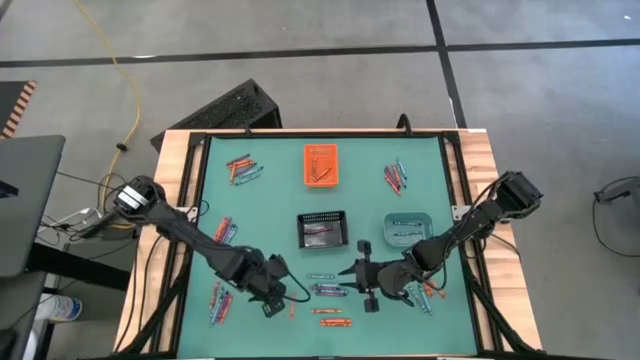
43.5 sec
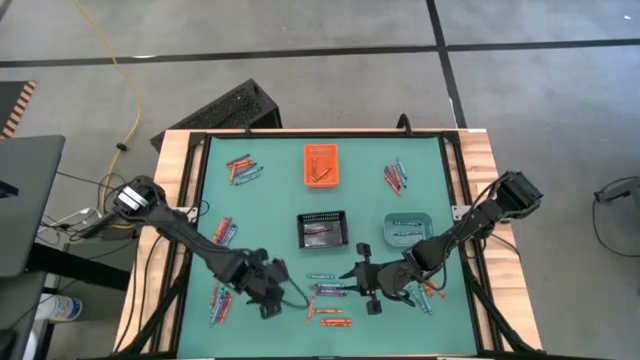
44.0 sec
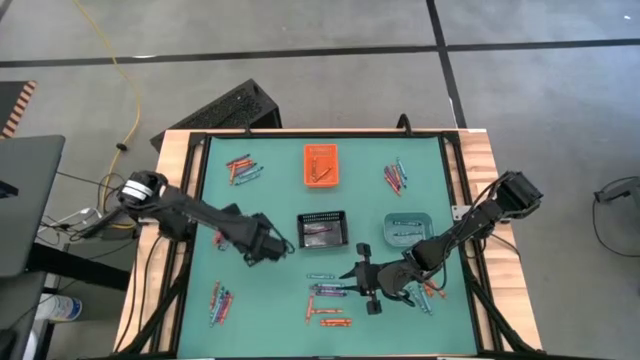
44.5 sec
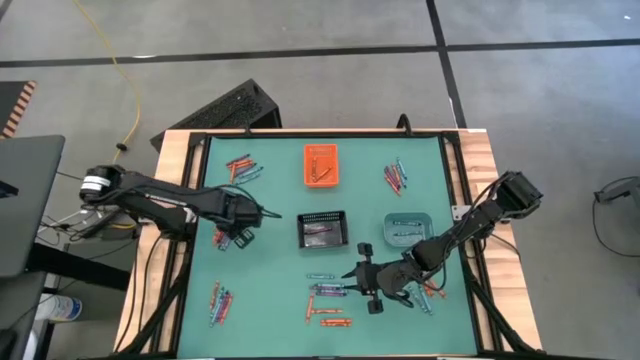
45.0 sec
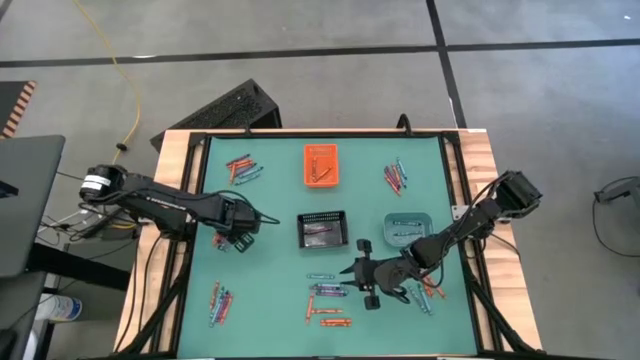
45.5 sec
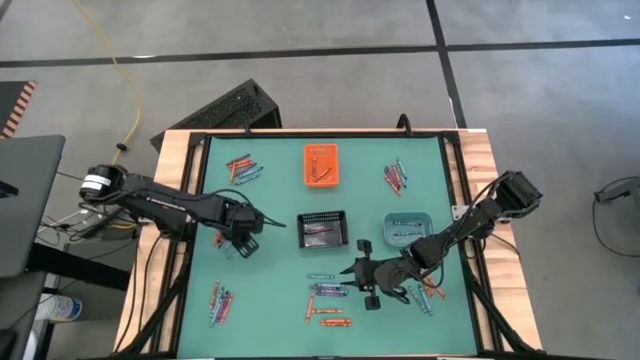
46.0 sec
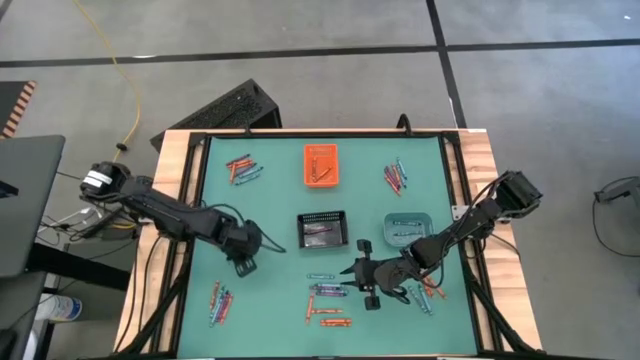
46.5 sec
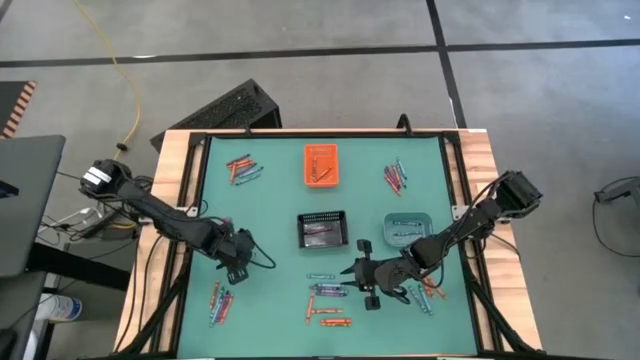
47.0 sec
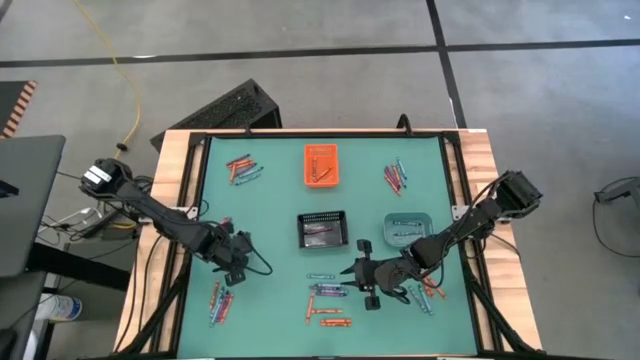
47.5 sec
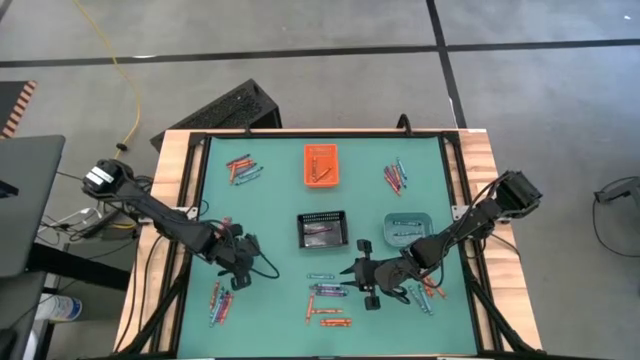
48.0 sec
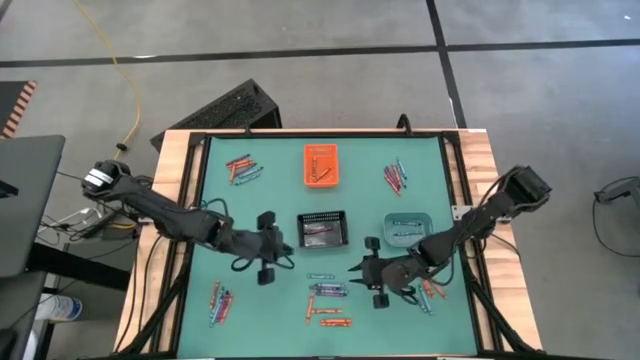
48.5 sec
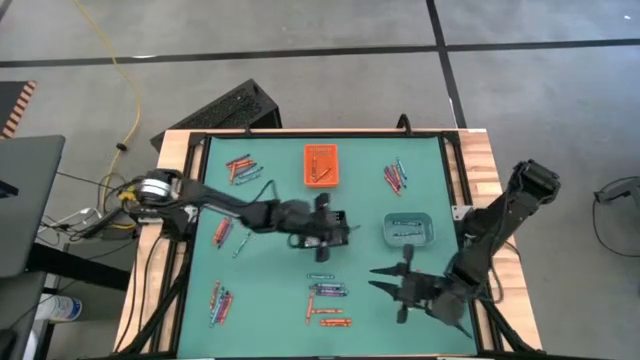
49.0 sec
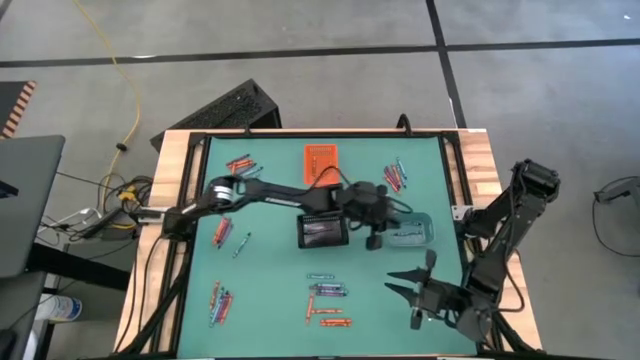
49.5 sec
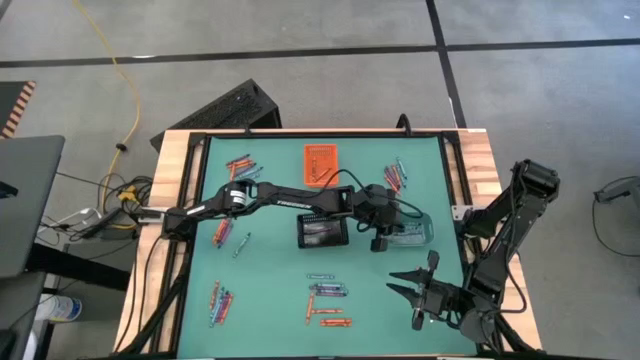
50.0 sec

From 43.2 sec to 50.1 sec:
Task: Sort crayons
Put the blue crayon into the green bin

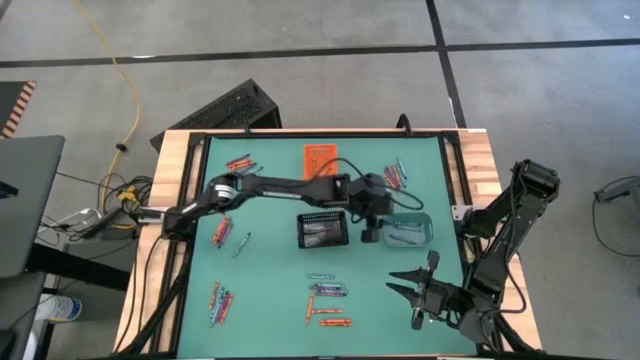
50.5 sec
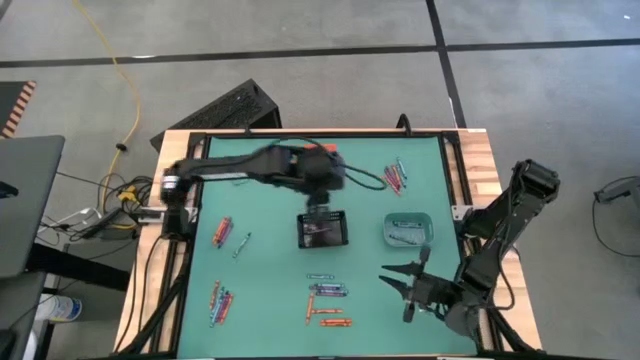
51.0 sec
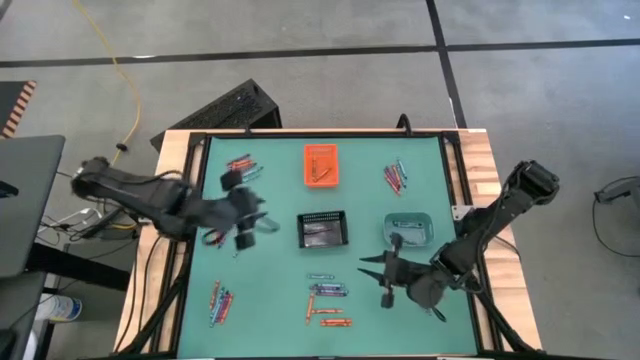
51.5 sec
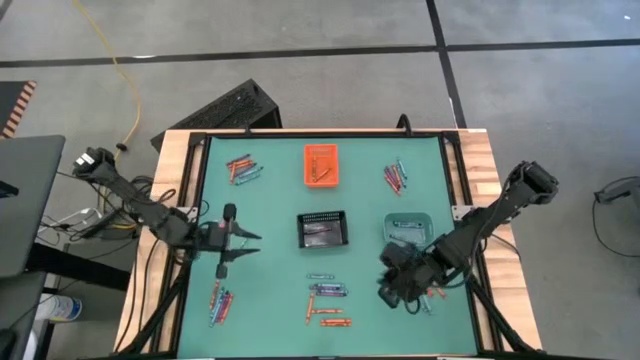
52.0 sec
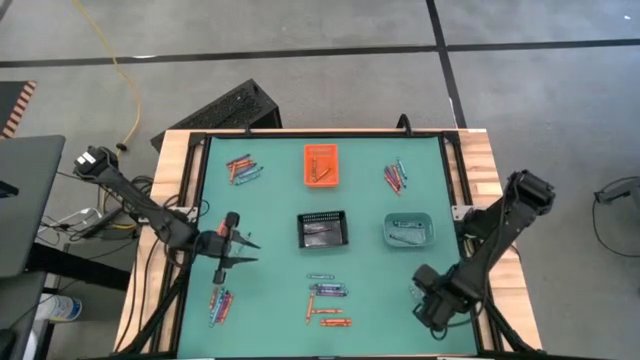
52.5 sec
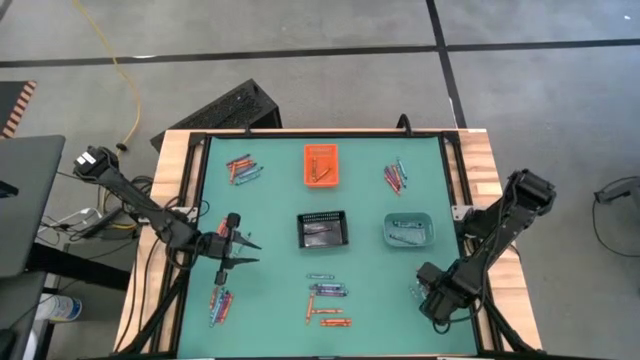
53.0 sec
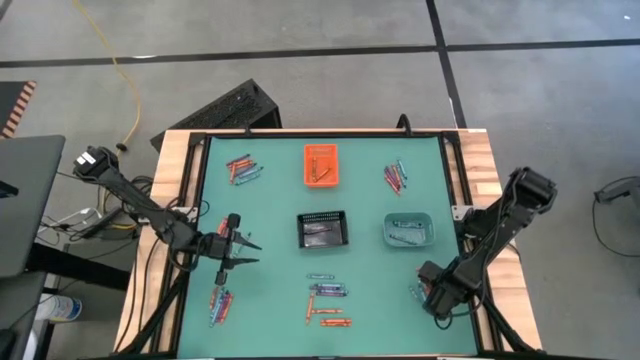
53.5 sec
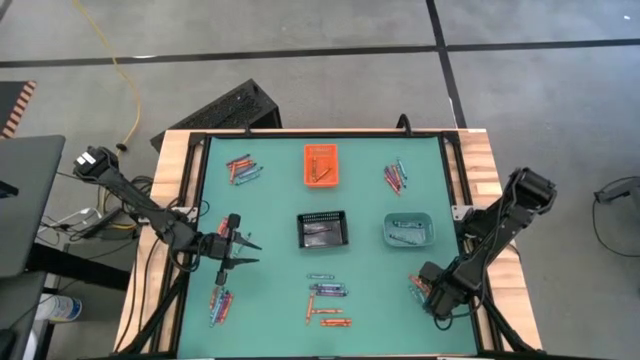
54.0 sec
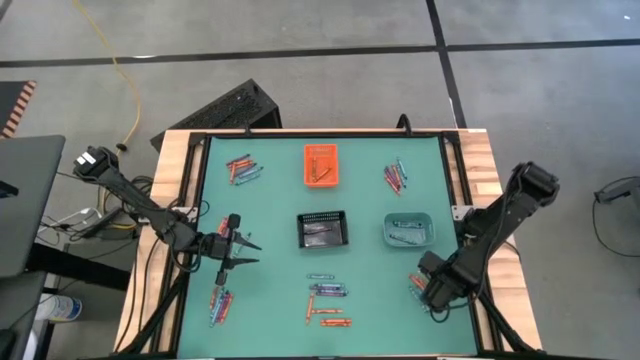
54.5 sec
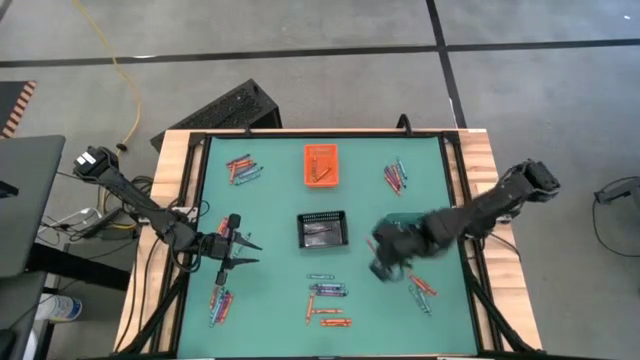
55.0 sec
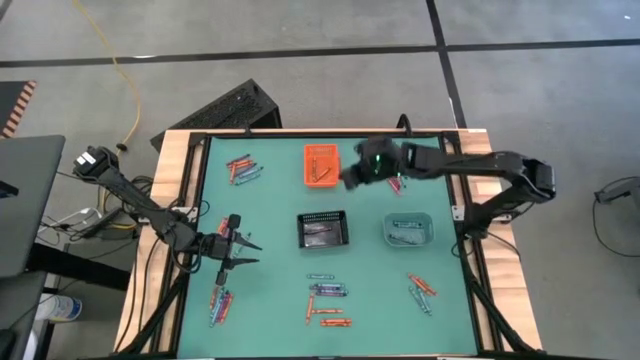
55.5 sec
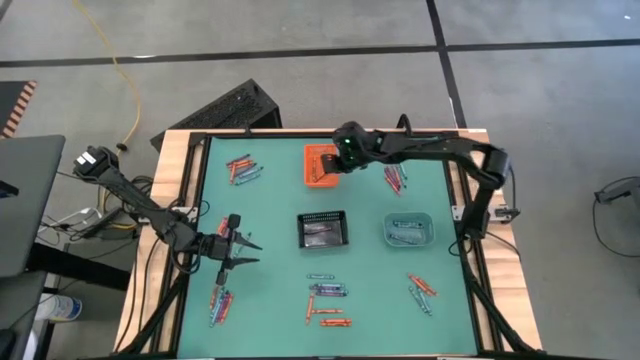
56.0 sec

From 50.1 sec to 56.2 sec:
Put the orange crayon into the orange bin

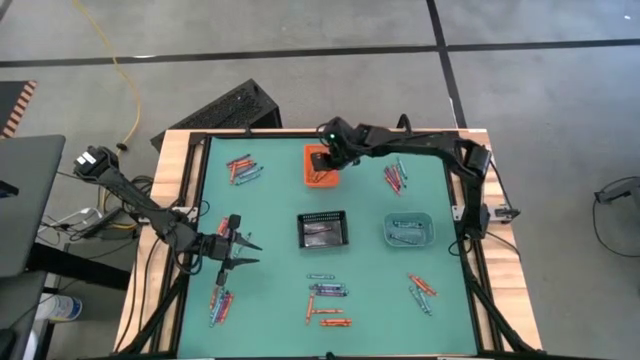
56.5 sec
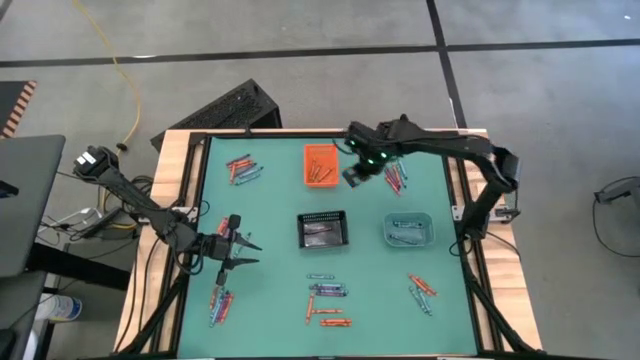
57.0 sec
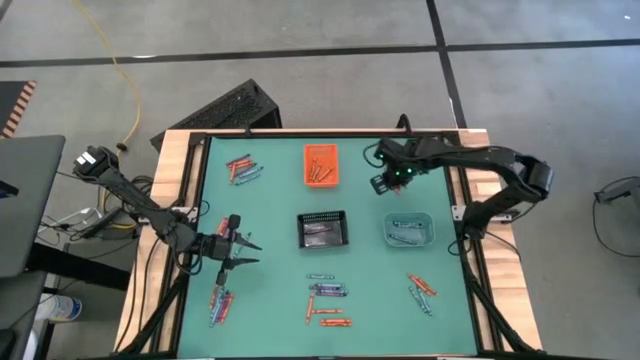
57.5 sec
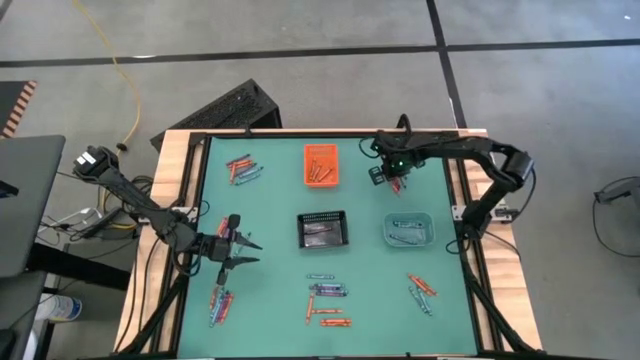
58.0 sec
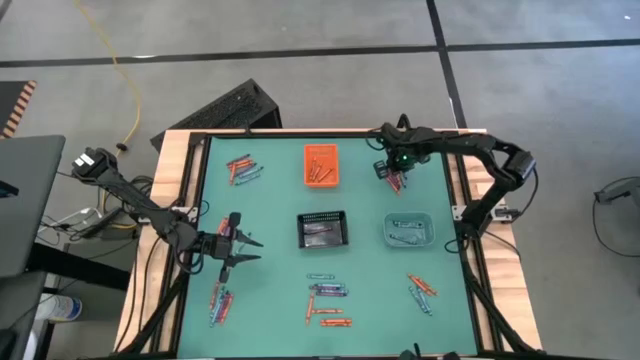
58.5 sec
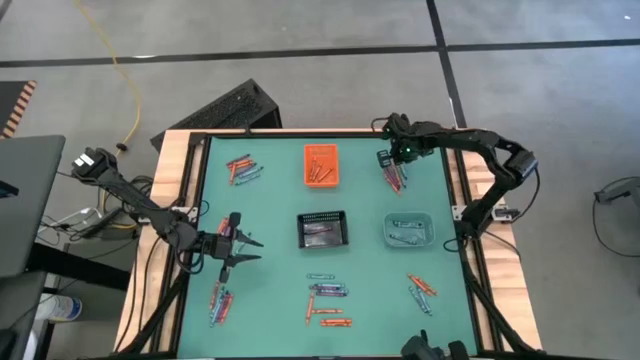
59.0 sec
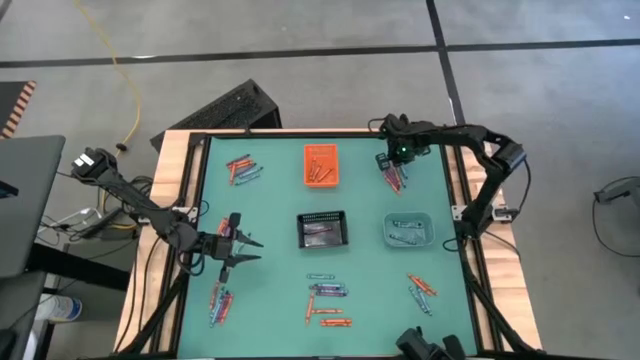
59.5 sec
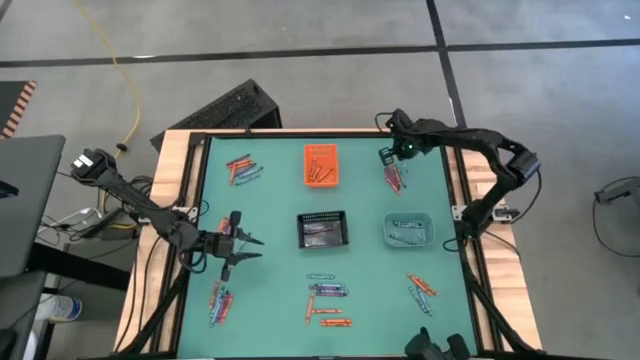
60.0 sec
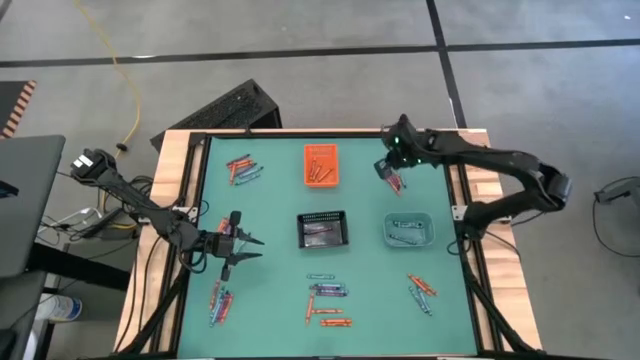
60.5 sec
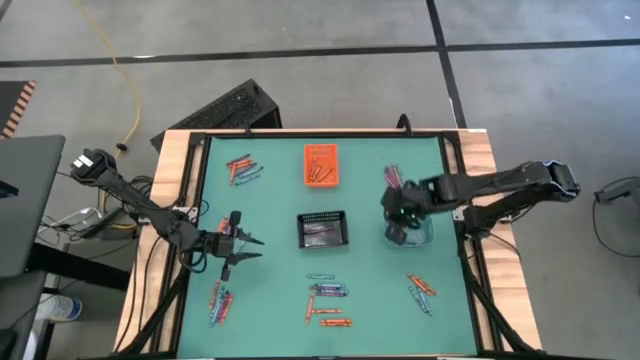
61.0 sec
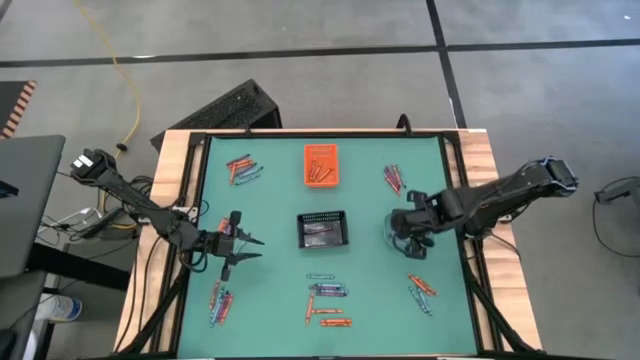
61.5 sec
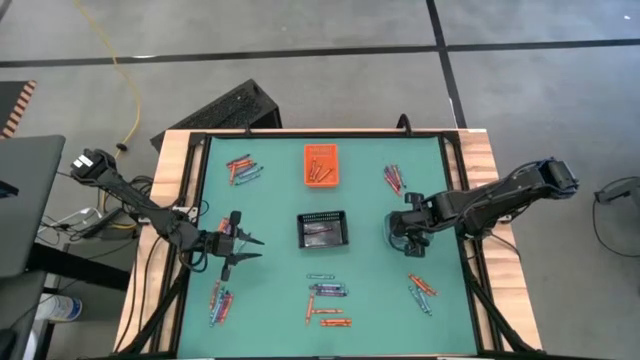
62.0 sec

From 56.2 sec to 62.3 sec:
Put the blue crayon into the green bin

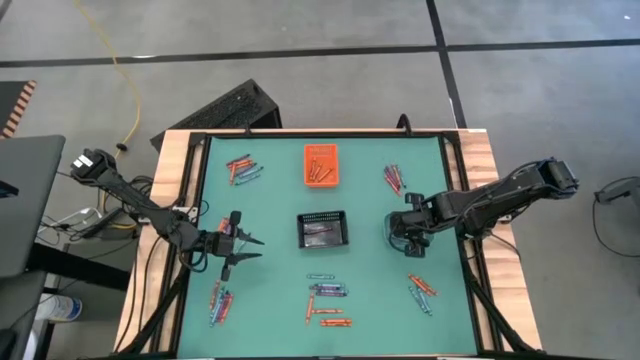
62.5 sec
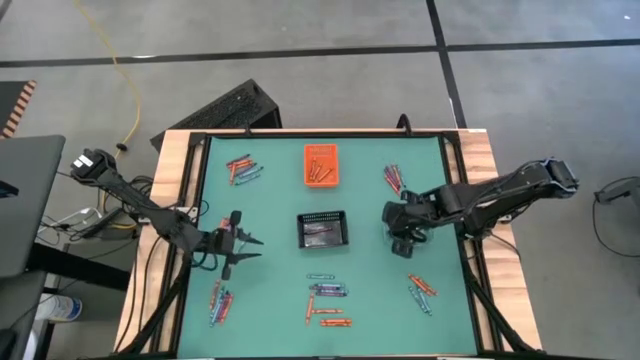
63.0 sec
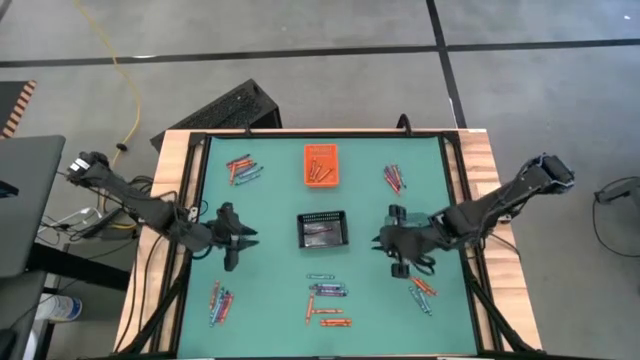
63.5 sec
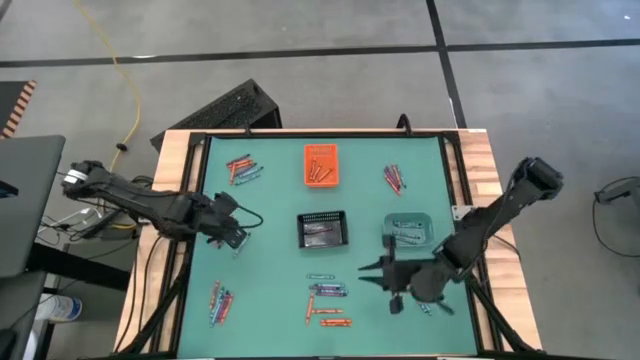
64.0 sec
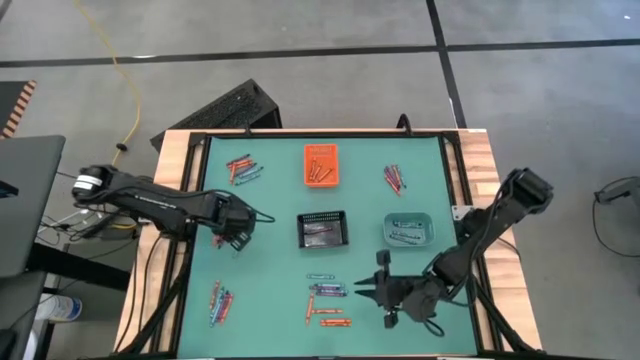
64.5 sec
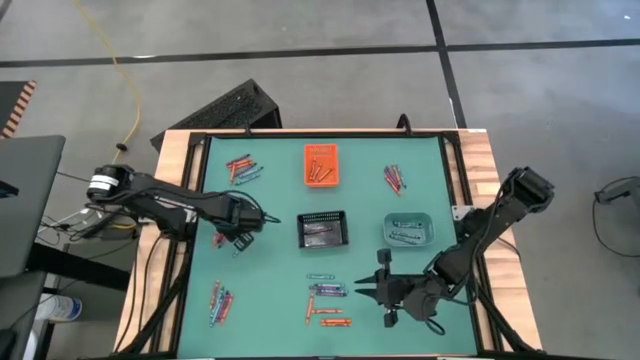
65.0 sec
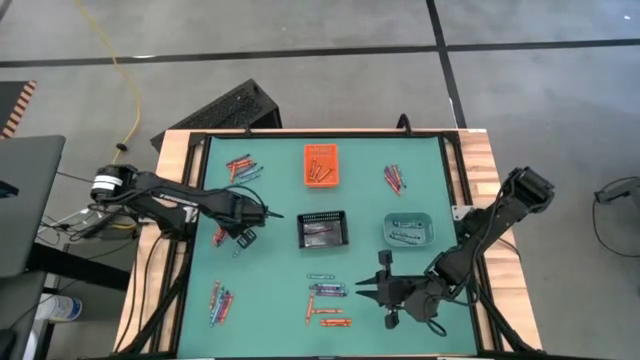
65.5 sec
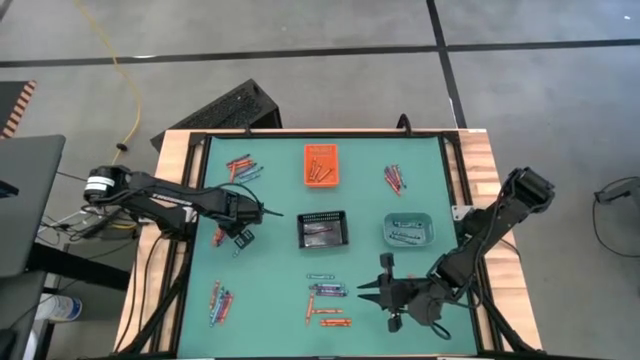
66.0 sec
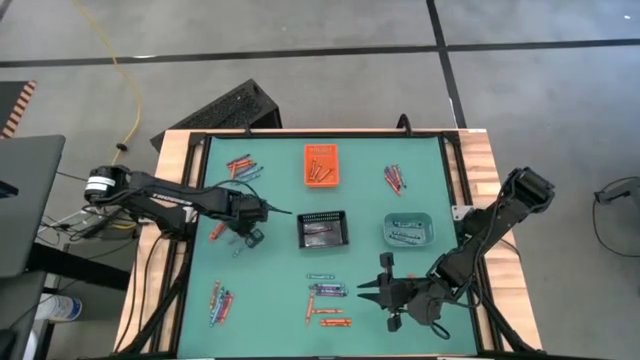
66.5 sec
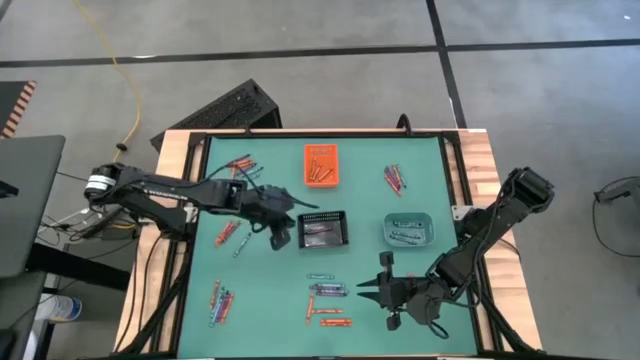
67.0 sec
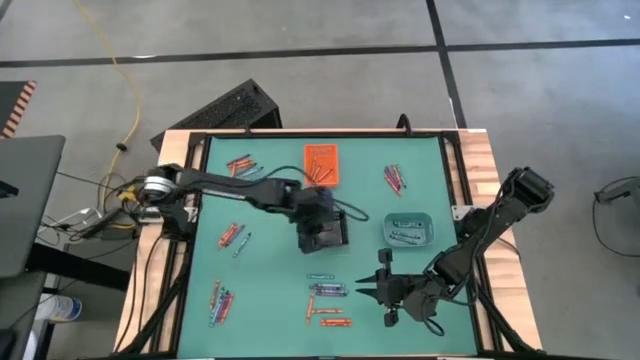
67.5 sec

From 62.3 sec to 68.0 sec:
Put the violet crayon into the black bin
